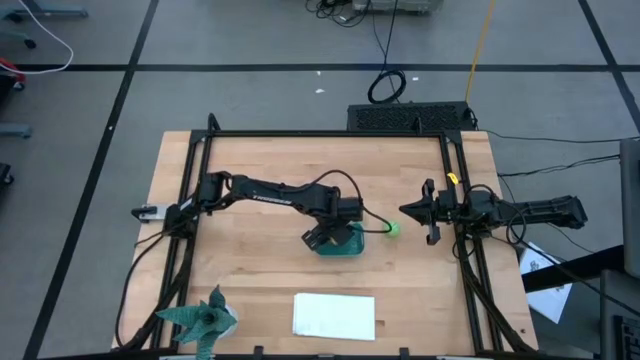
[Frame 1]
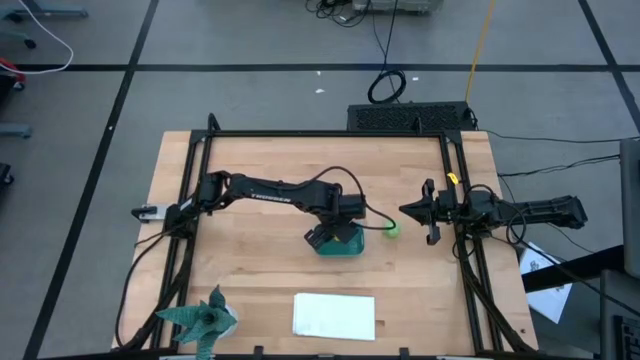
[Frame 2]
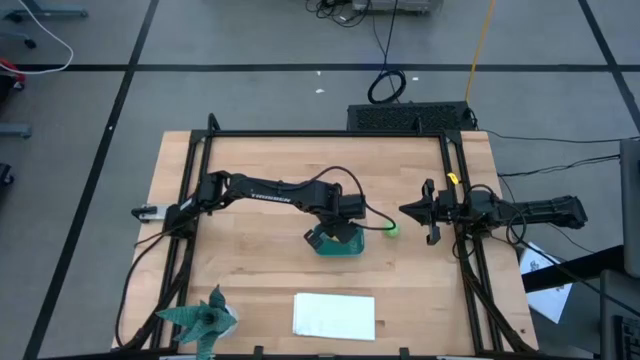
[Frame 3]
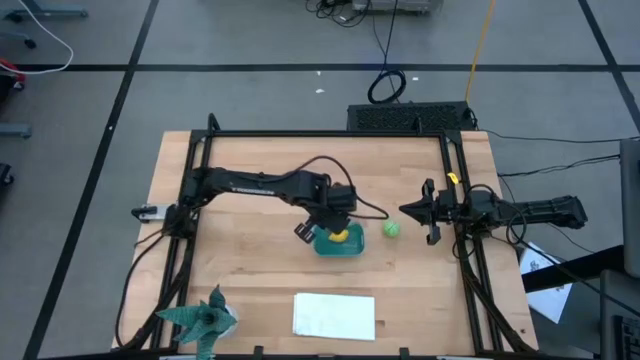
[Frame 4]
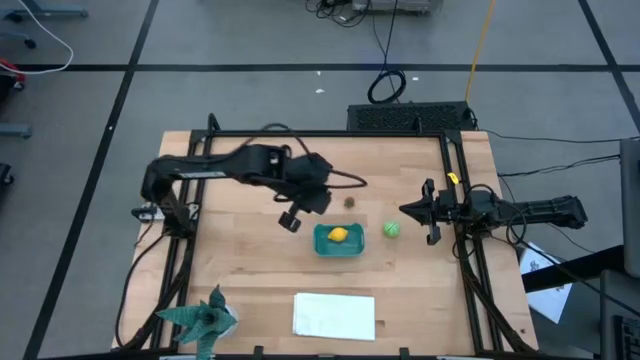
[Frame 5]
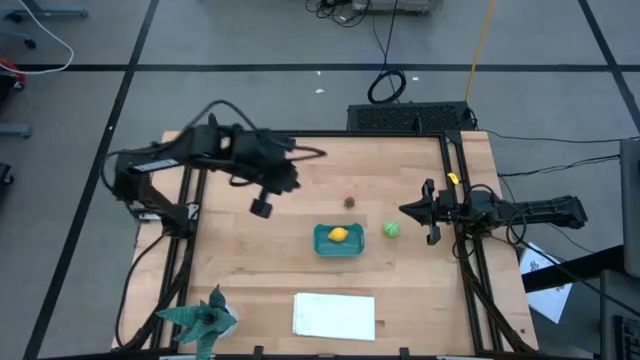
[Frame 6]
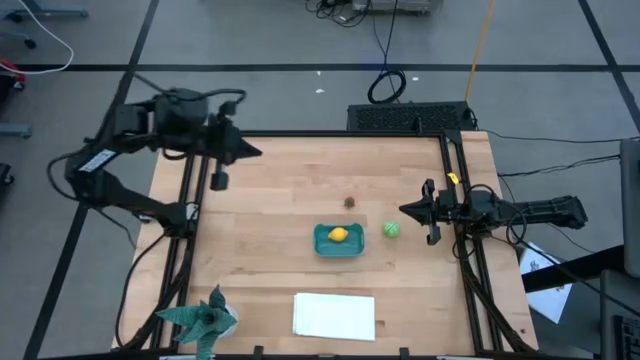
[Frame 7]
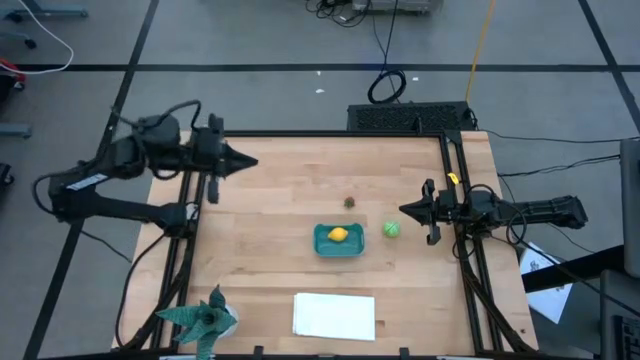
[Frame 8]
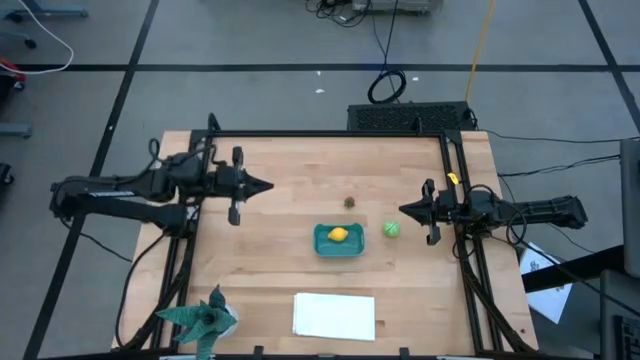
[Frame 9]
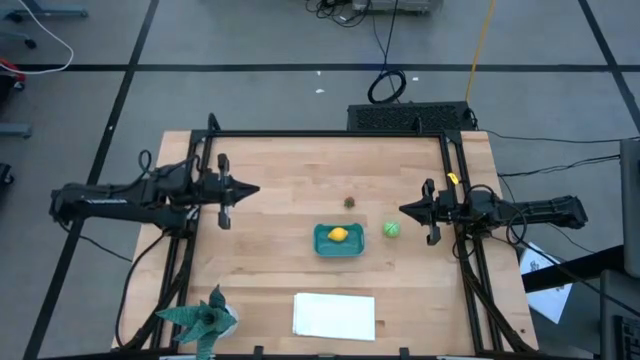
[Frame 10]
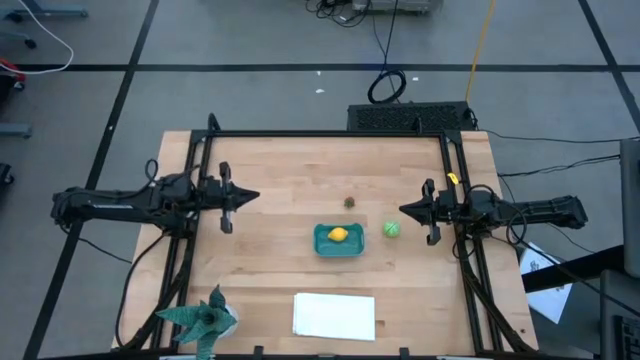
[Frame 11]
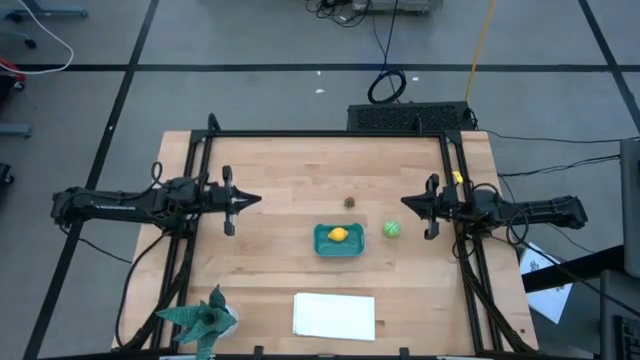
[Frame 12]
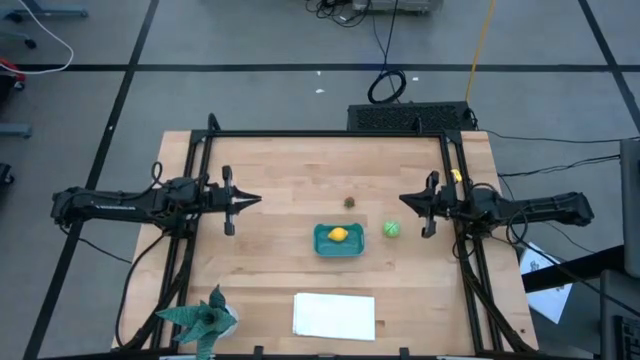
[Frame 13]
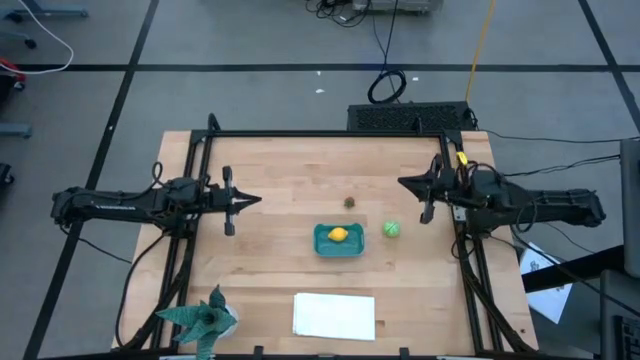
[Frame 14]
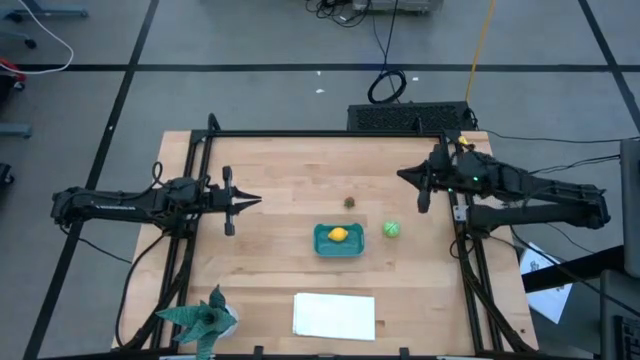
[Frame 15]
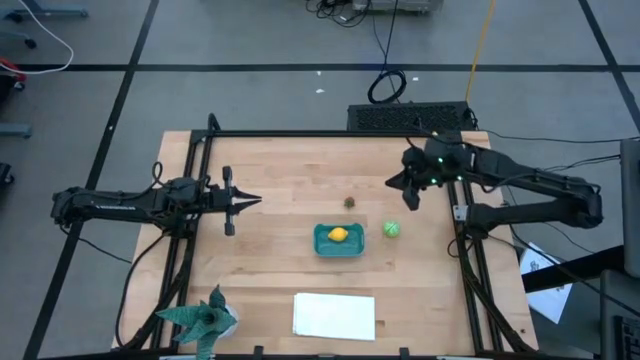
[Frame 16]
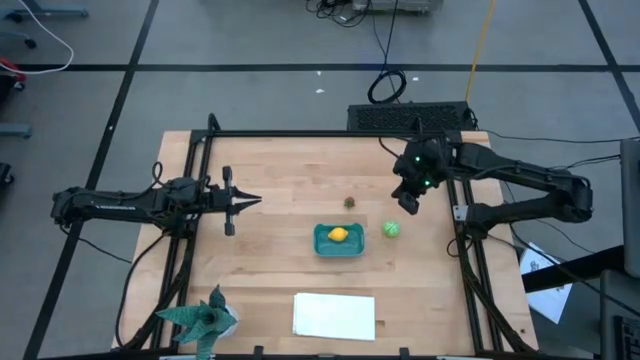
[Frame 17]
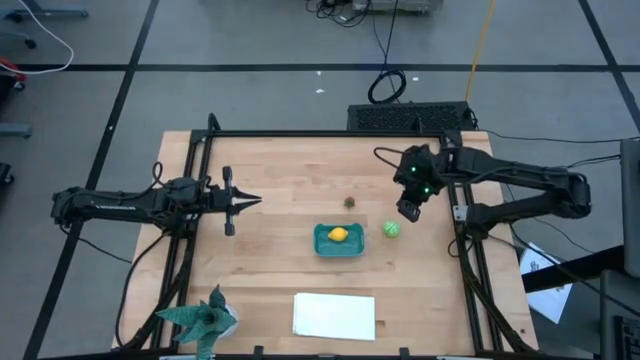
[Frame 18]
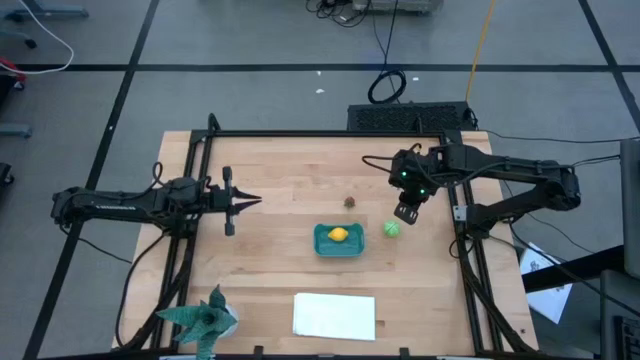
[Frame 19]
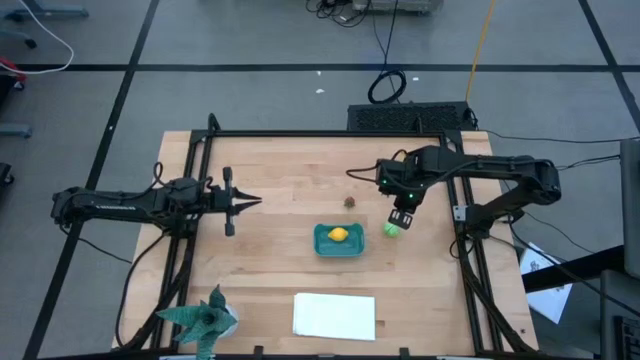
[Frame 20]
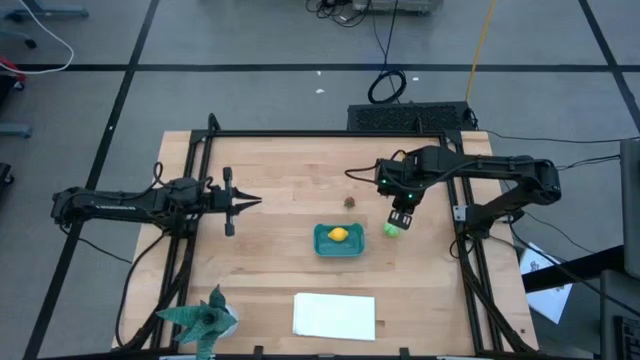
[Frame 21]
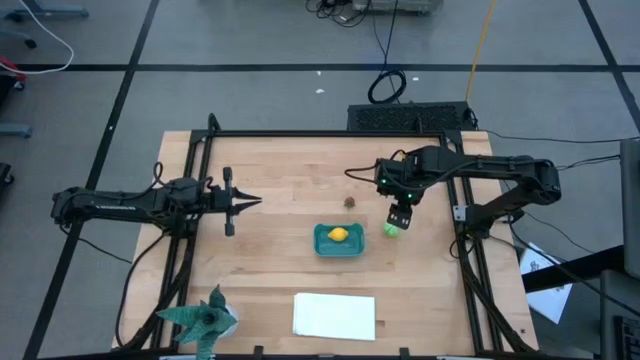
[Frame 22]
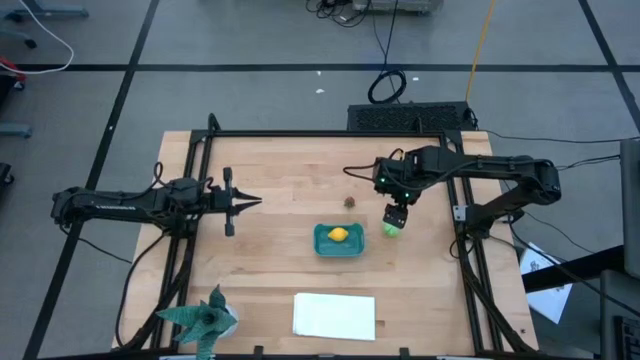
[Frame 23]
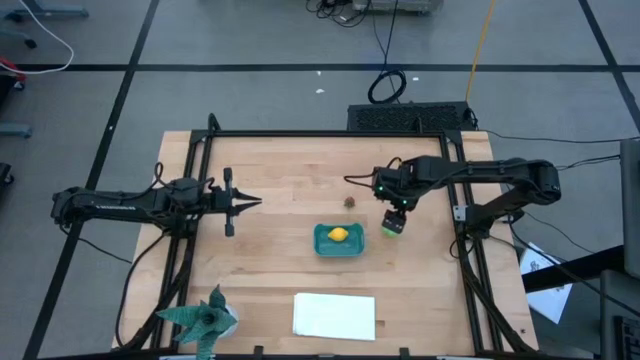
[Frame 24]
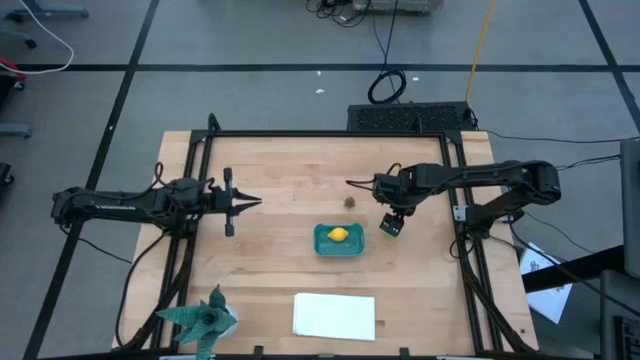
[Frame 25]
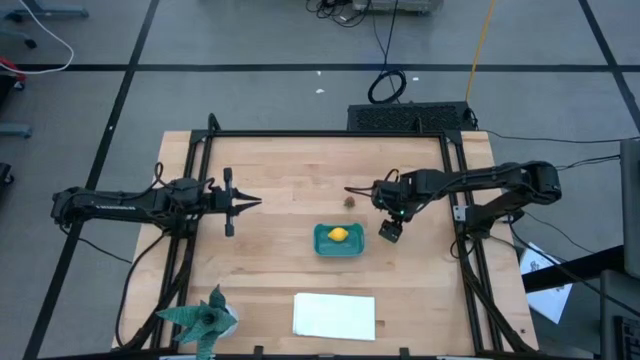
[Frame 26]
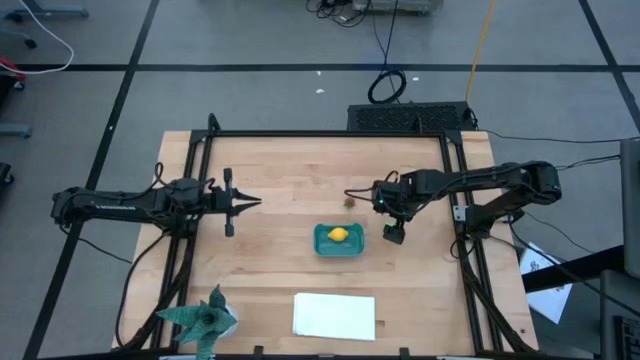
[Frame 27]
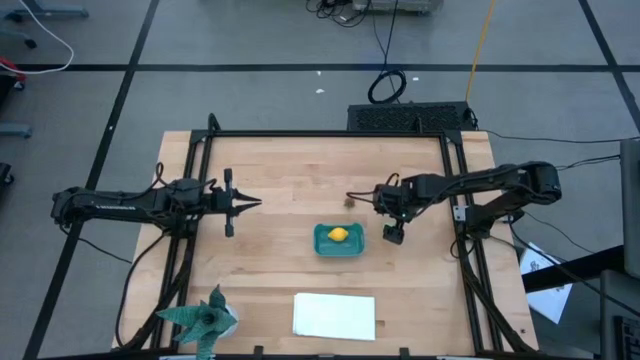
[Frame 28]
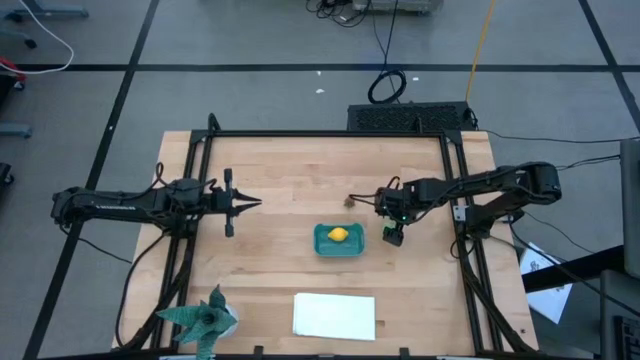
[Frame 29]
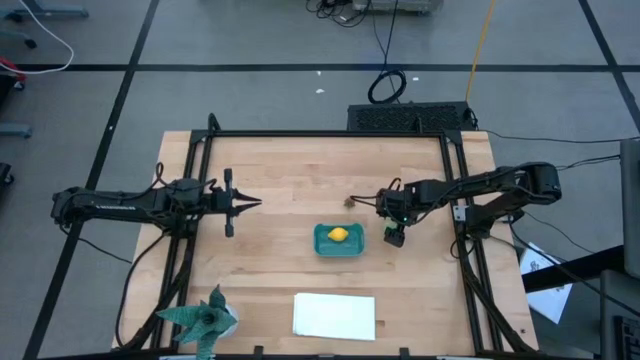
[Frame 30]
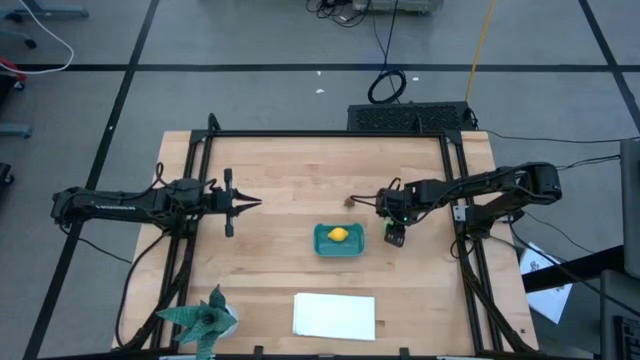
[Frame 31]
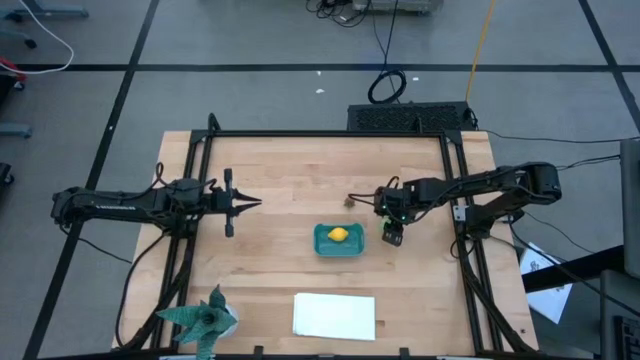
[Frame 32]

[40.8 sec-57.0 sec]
Task: Pick and placing Produce into tupperware
Put the top sliced green cabbage into the green bin

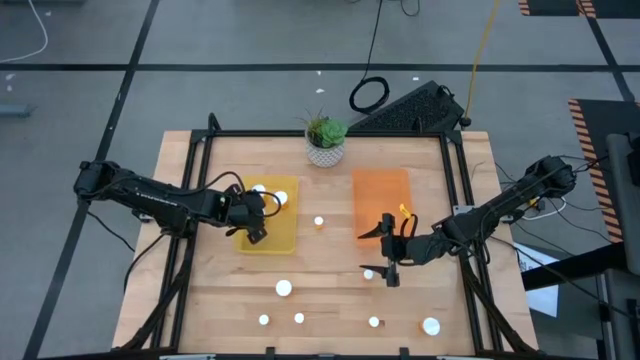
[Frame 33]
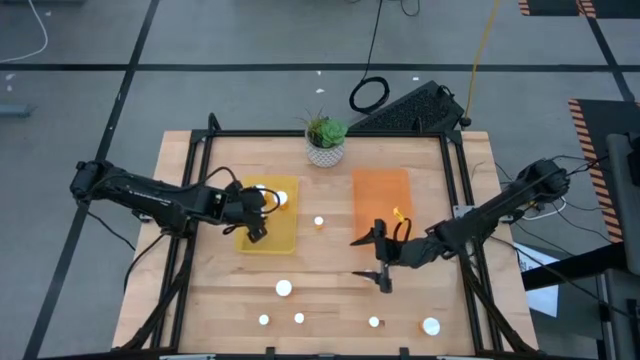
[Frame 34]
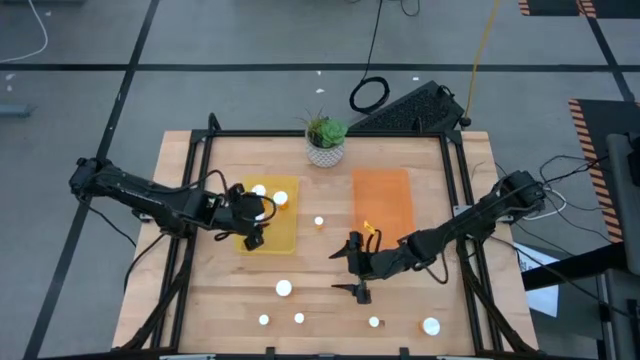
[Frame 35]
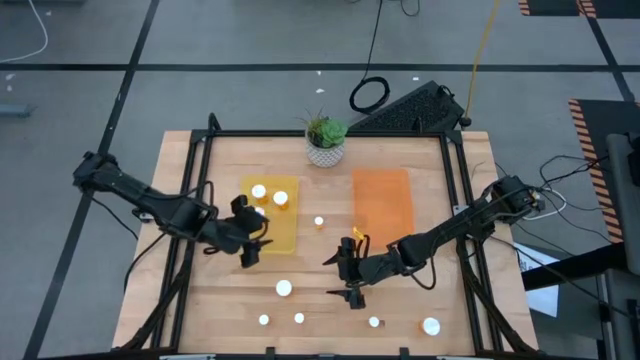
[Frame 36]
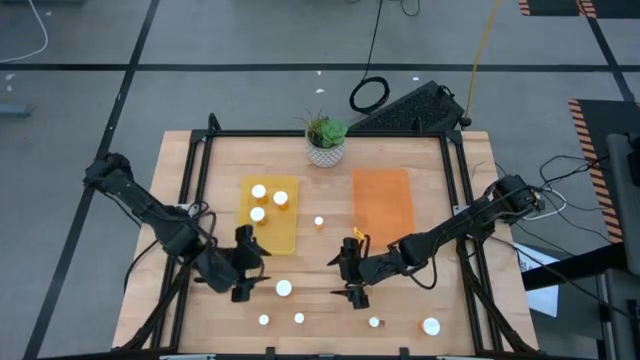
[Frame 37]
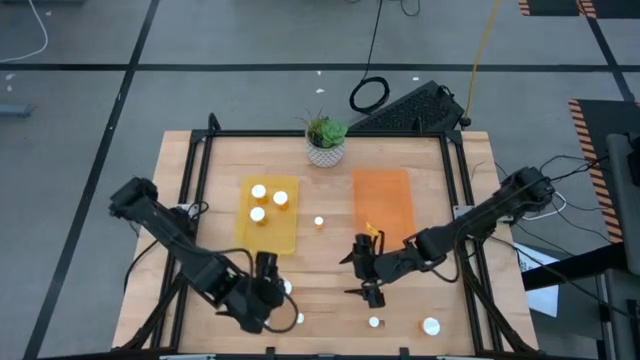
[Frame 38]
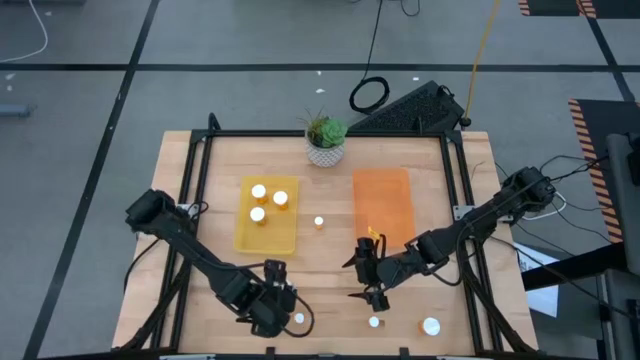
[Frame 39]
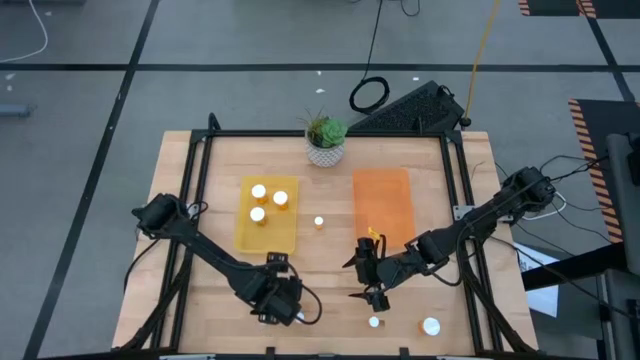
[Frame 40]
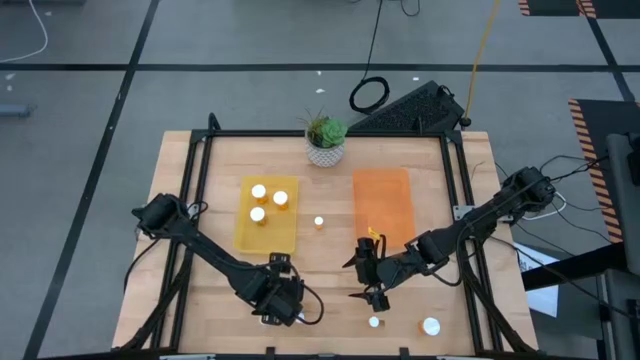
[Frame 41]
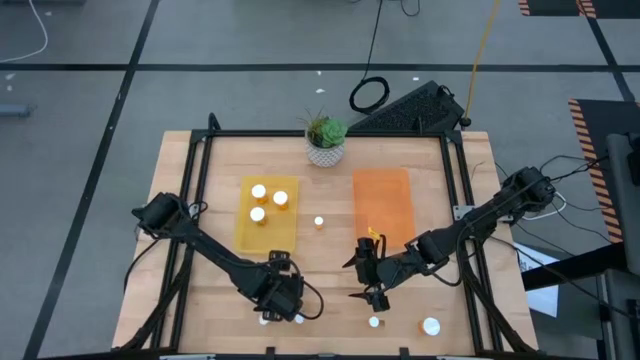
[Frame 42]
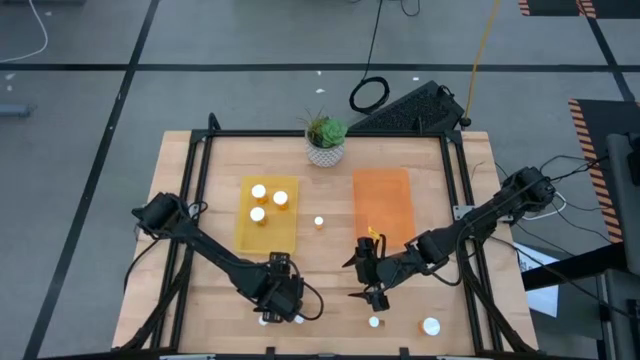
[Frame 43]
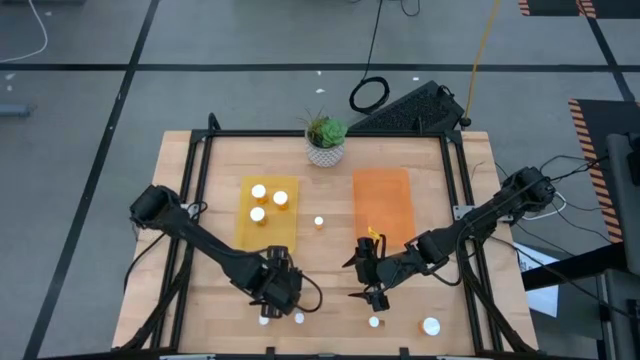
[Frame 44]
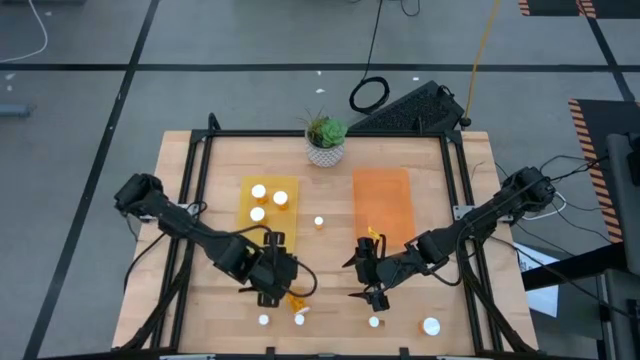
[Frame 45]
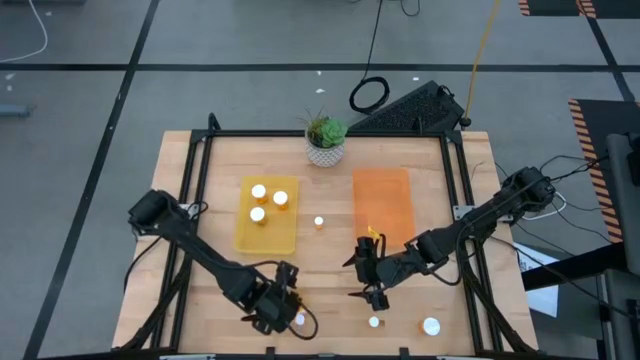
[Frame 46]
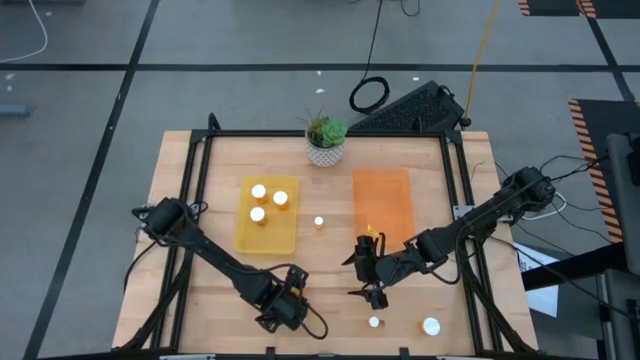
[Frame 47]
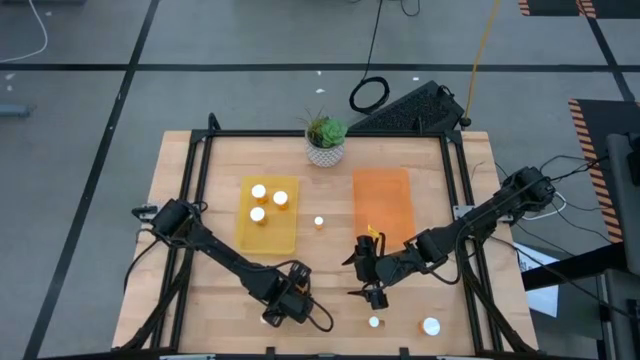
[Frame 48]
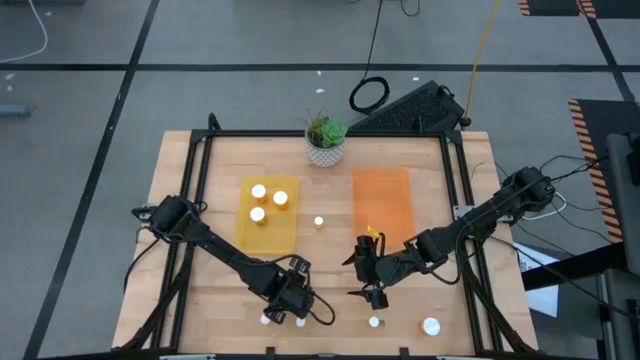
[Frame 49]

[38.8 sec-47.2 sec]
Task: Pick and place medicine bottles into bin by pill shape (circle, oval)
Put the large medicine bottle into the yellow bin
